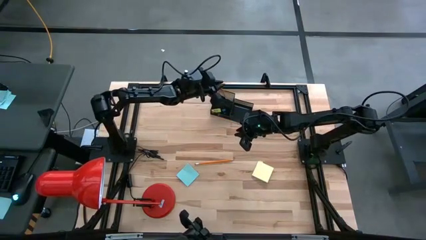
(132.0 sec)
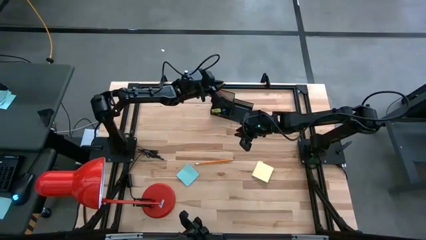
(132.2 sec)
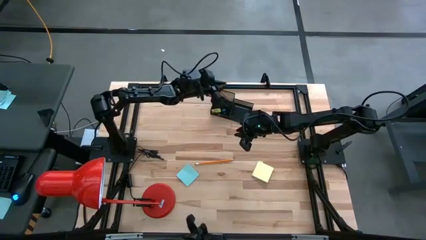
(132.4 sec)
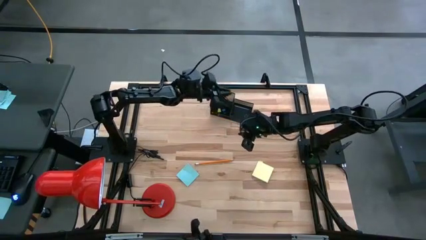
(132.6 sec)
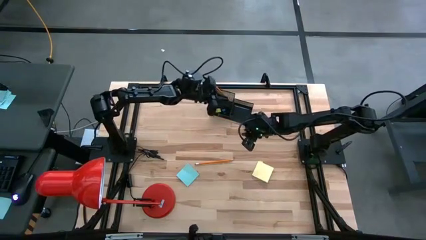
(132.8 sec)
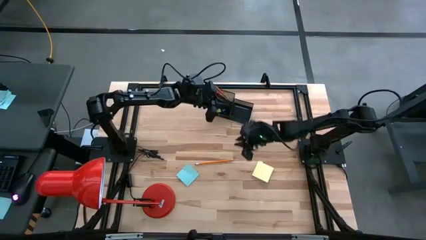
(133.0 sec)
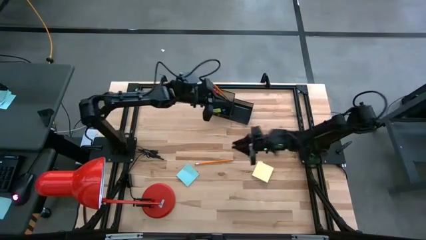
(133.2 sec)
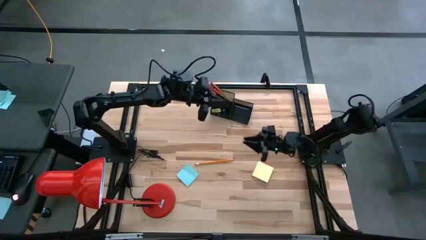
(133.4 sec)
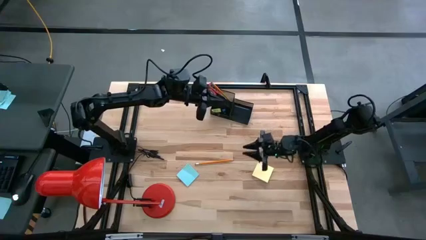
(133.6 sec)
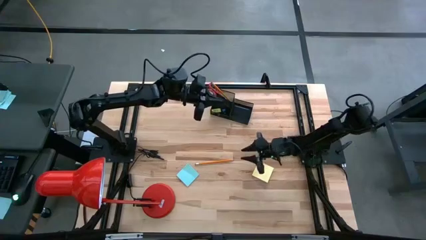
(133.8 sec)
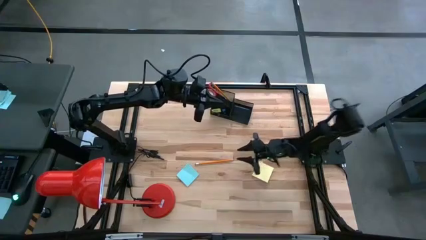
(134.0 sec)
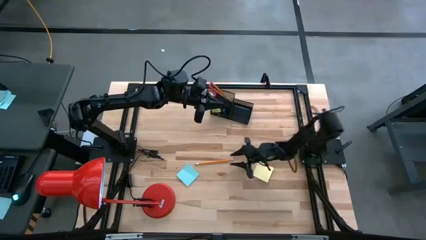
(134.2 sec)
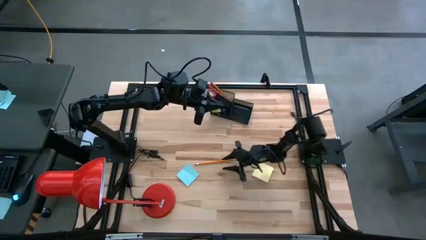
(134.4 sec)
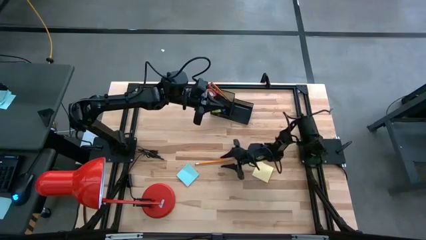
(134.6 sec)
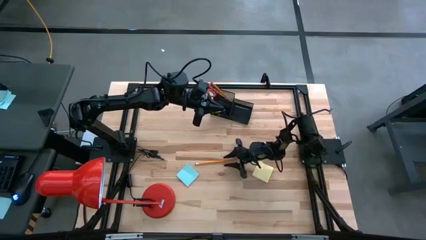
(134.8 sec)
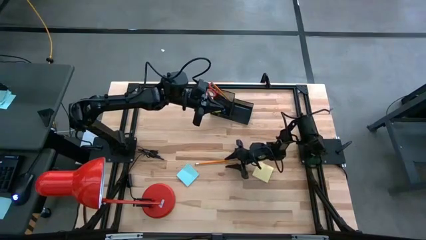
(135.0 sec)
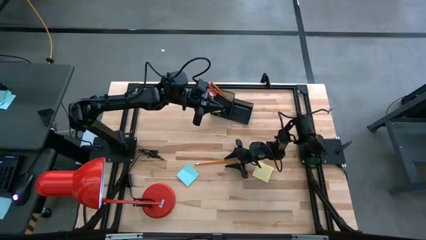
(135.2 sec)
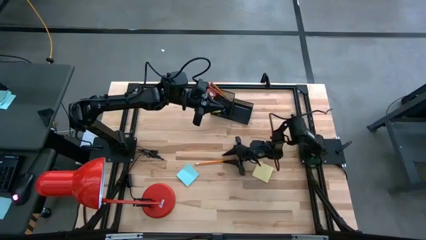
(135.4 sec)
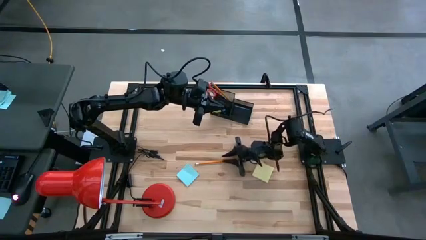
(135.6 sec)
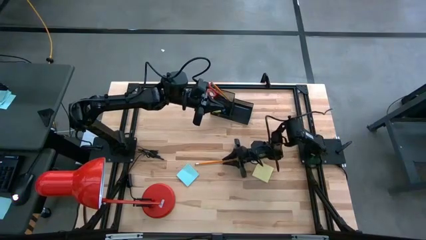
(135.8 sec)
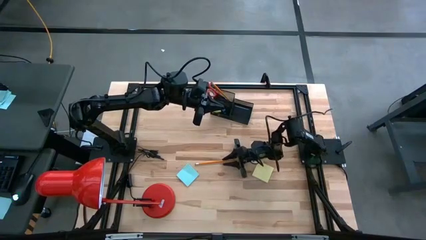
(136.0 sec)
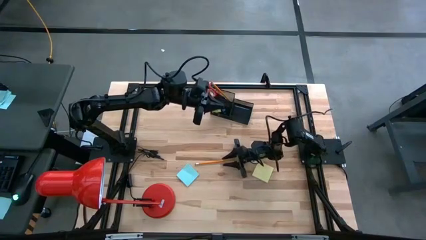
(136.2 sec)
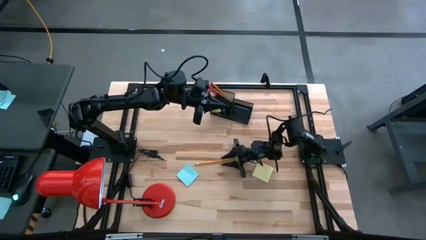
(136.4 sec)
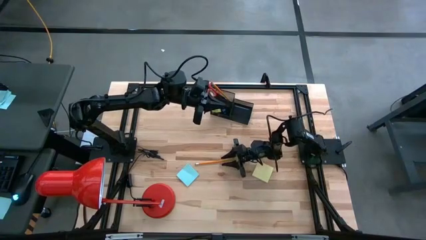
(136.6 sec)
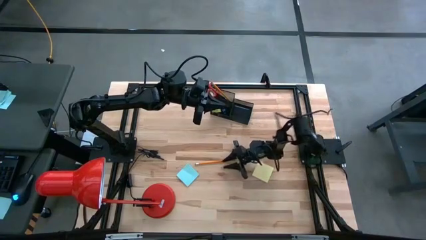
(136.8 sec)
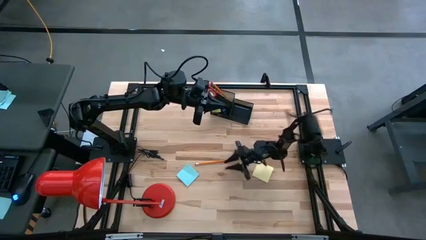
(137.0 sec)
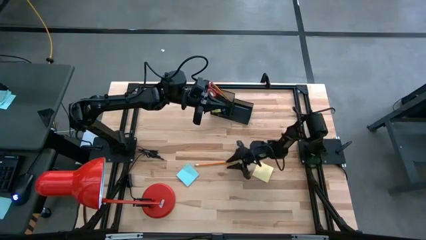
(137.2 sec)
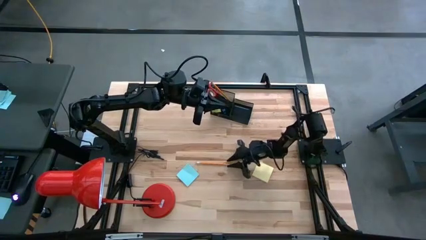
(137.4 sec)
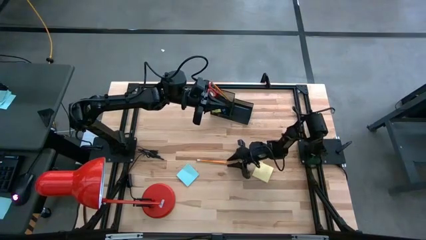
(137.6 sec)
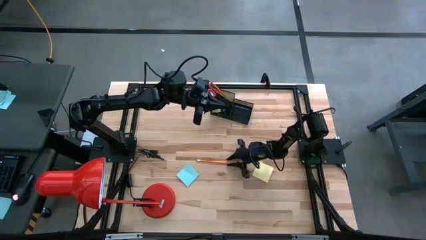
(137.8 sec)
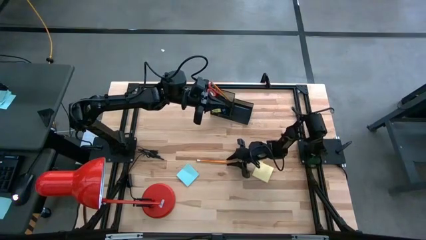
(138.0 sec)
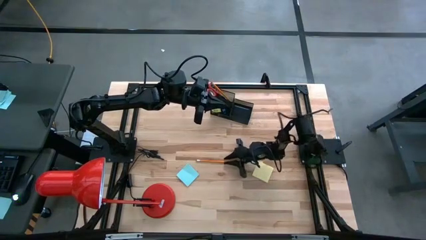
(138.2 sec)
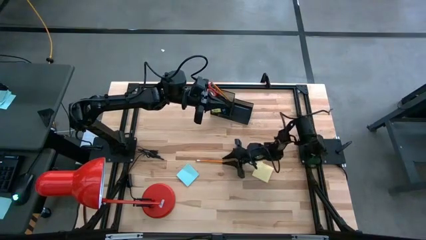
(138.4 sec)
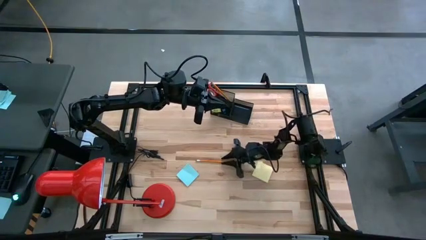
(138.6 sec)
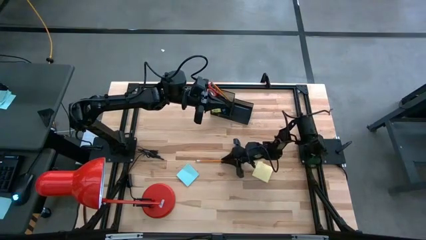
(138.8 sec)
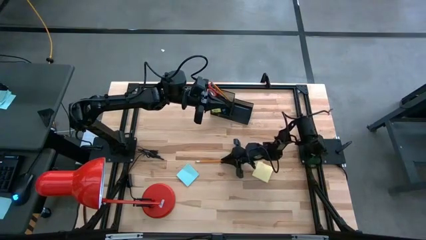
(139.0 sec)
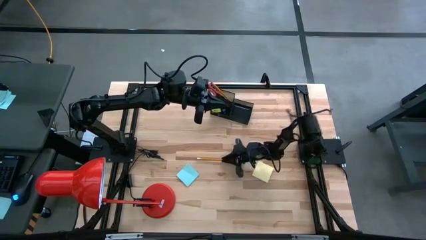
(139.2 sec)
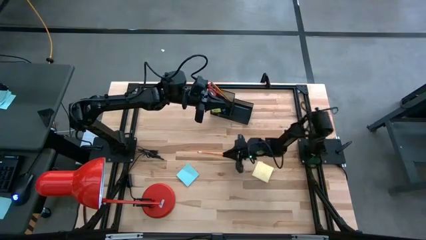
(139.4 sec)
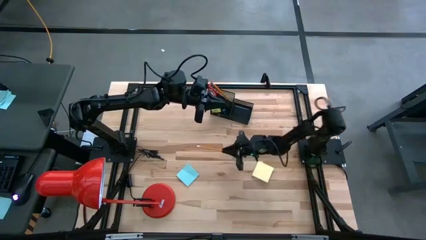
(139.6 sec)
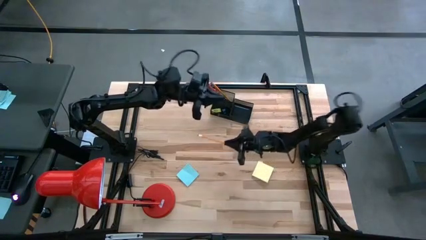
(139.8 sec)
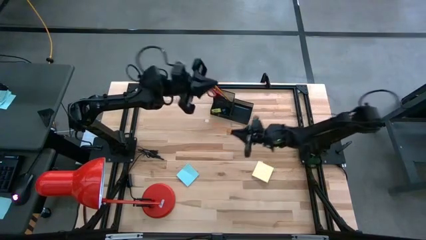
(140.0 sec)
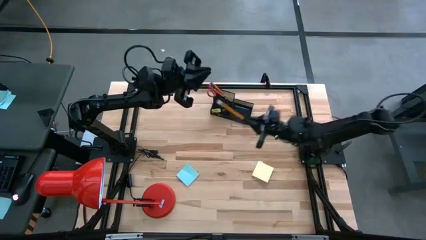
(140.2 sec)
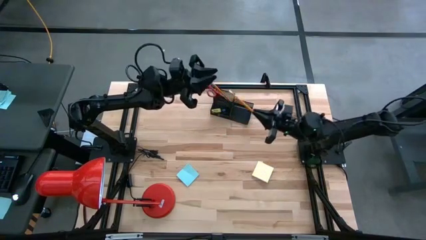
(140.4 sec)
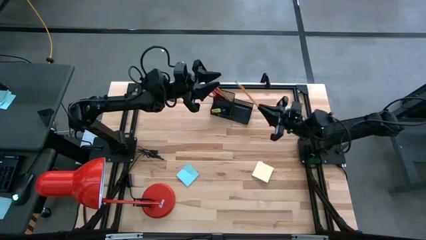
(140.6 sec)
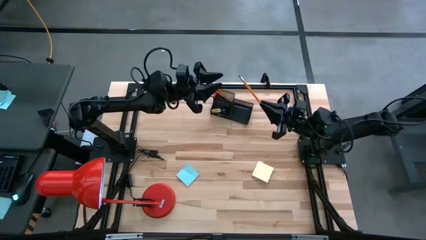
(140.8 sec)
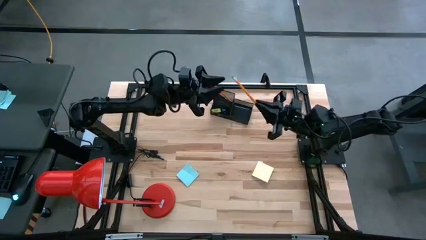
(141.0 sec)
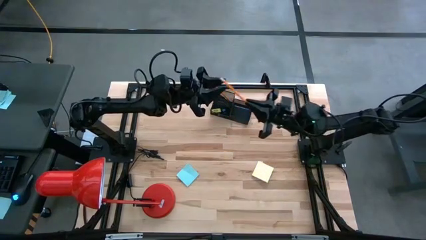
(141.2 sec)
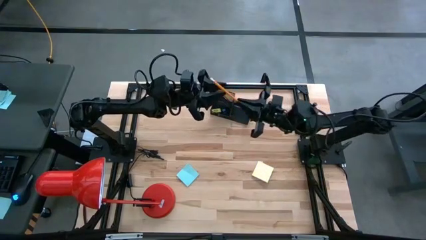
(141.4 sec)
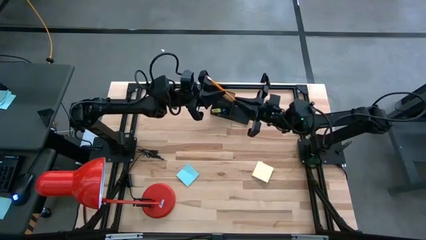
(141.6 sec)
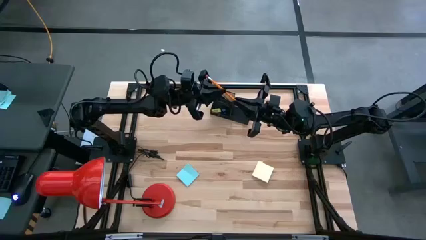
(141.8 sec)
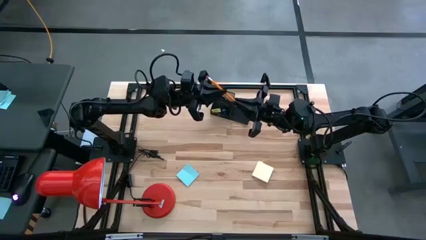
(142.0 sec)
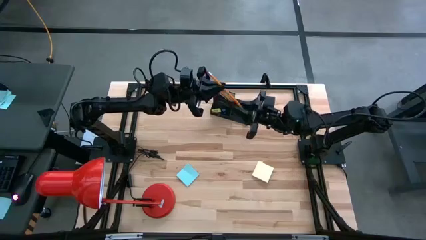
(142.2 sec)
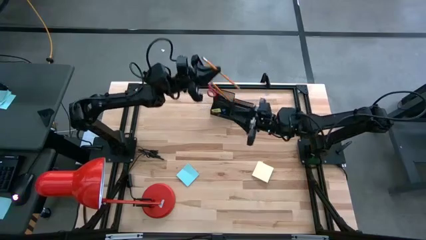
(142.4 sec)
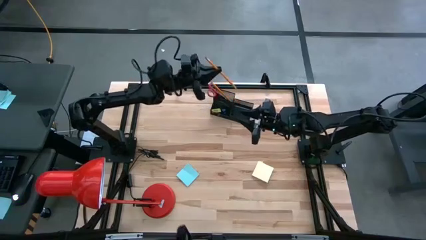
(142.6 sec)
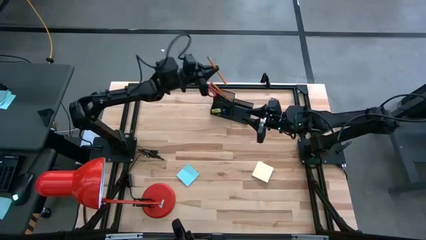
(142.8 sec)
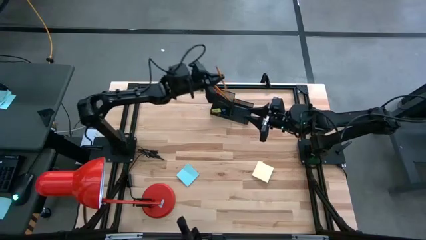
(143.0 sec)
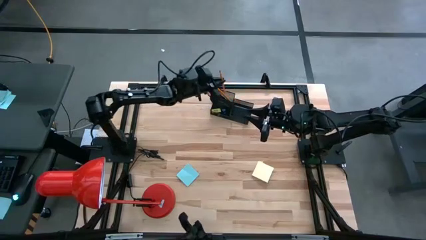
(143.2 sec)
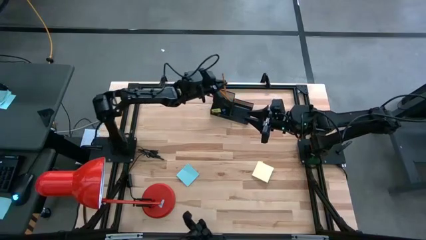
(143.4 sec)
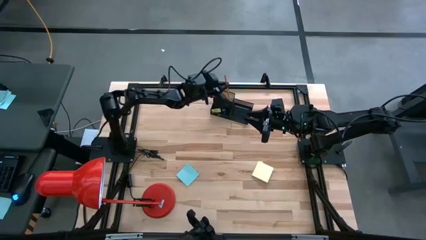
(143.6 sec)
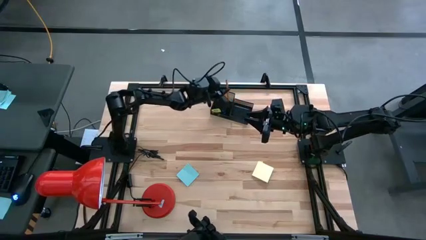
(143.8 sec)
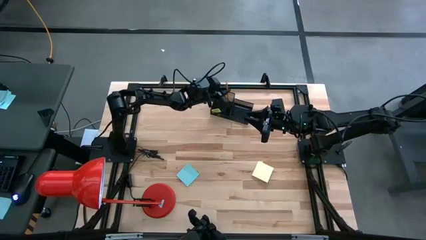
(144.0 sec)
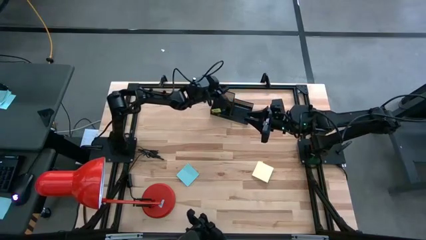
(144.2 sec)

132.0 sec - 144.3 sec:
Task: Pick and place office supplies into organizer
Put the yellow pencil in the black desk organizer

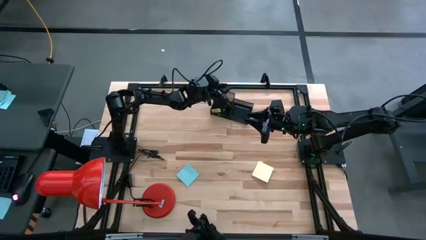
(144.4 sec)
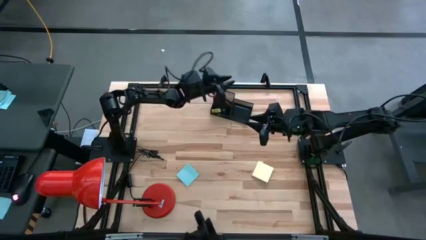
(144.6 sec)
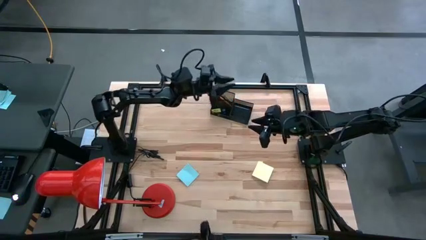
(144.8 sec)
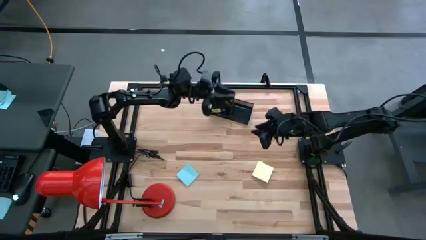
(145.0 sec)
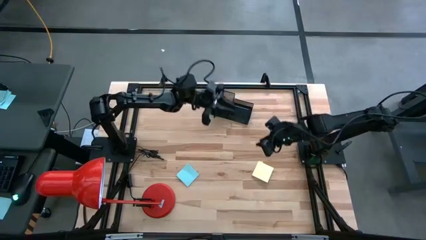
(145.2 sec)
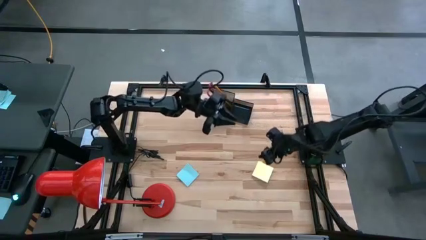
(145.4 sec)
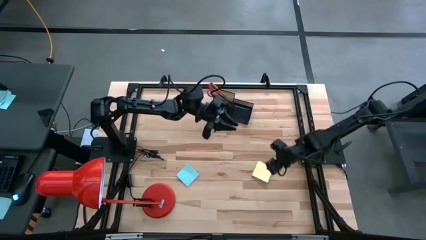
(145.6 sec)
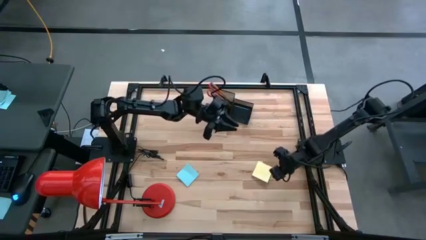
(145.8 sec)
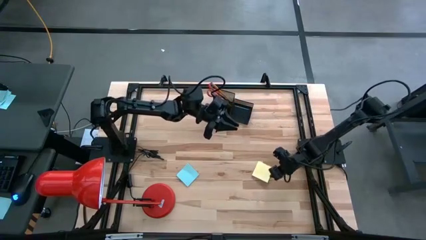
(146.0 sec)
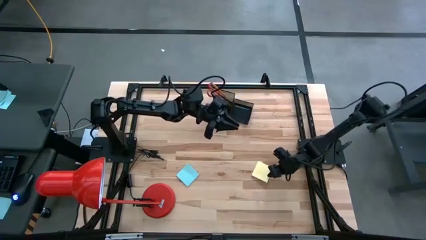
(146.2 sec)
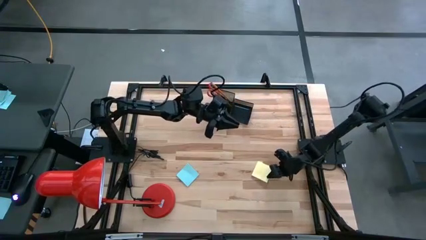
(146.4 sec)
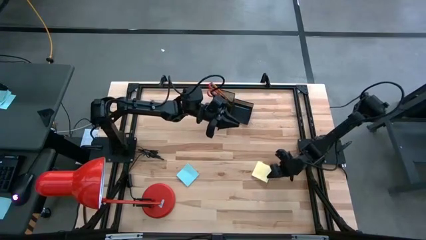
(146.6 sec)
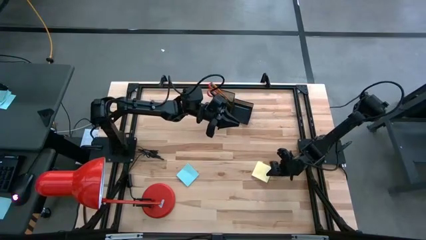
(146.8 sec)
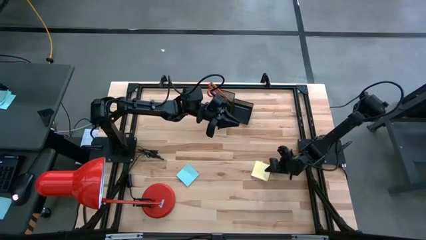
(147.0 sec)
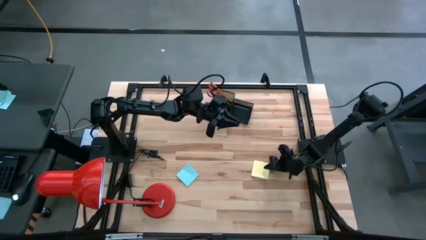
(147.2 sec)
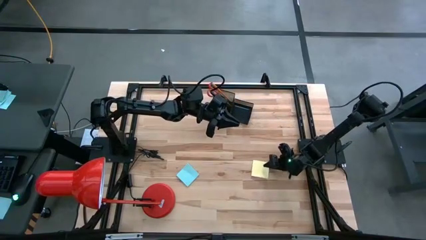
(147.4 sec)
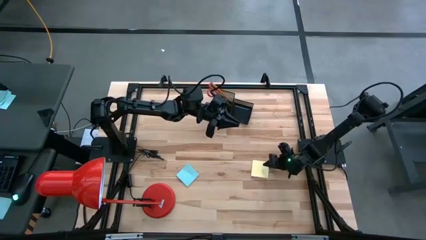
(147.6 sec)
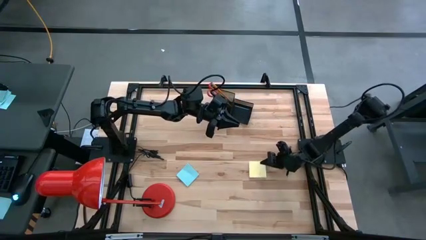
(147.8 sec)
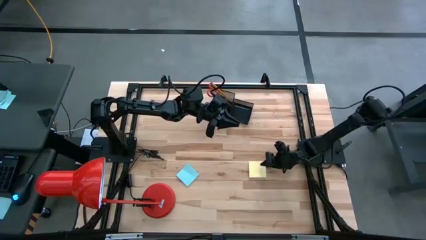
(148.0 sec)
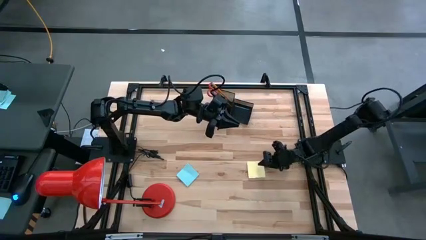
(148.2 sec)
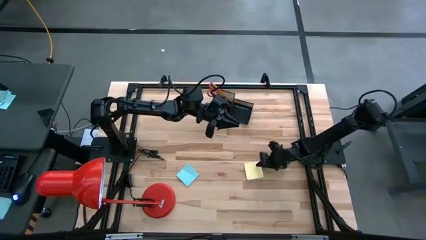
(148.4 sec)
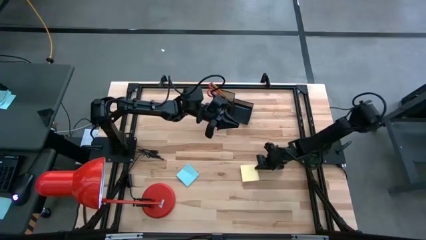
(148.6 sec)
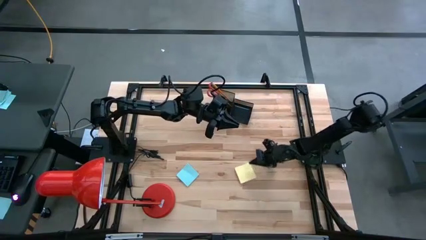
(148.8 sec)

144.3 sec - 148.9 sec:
Put the yellow sticky notes in the black desk organizer
